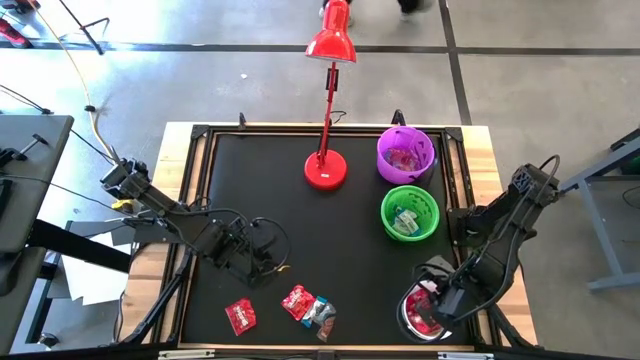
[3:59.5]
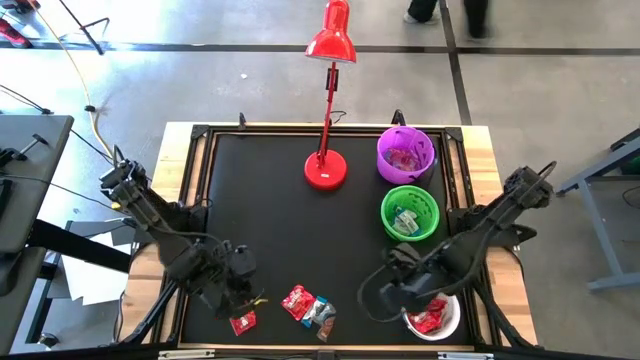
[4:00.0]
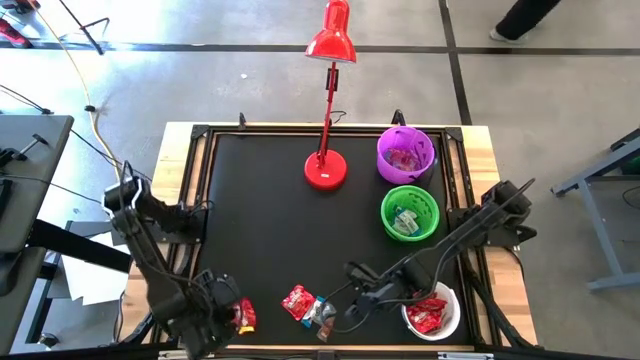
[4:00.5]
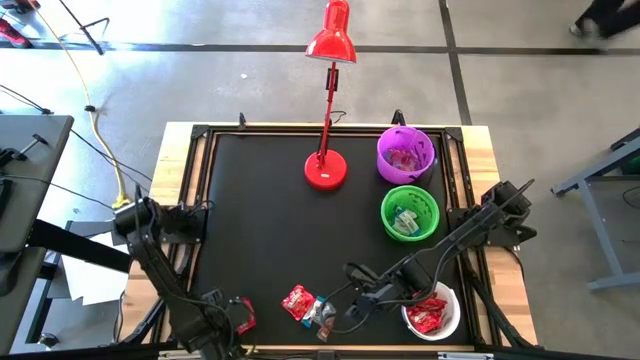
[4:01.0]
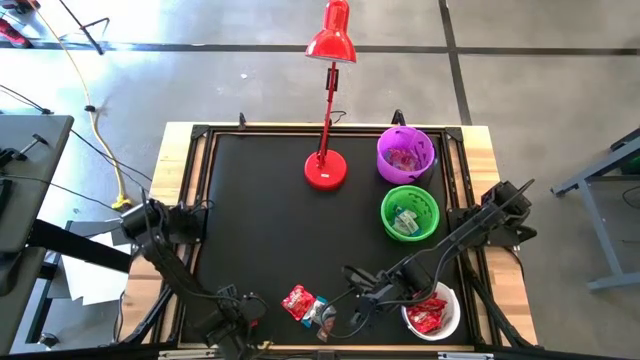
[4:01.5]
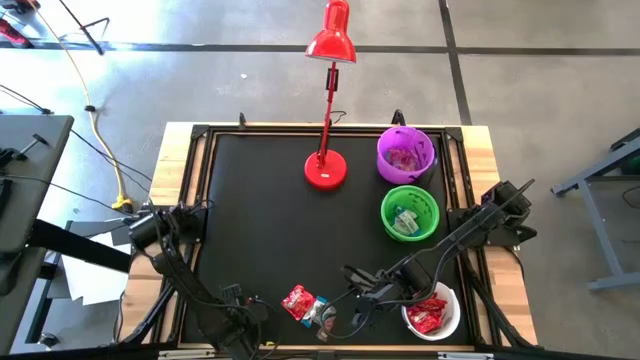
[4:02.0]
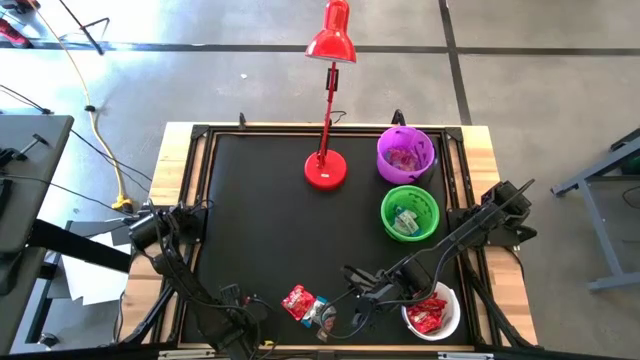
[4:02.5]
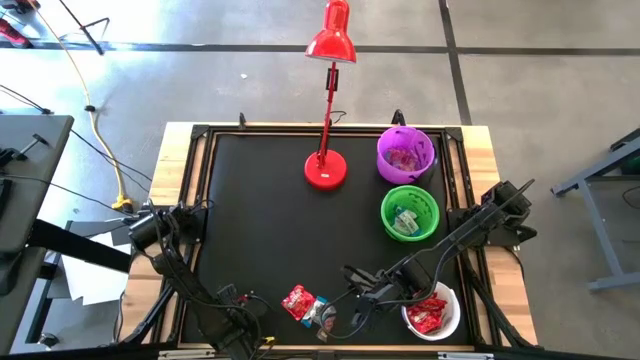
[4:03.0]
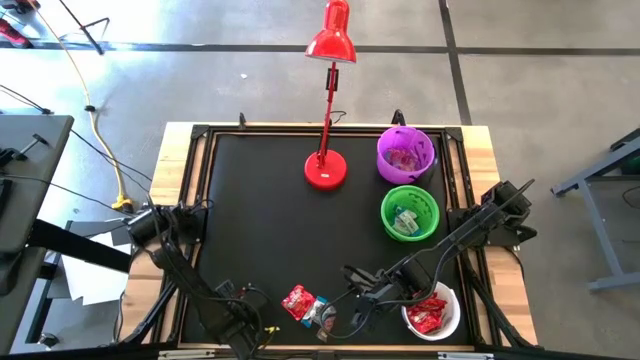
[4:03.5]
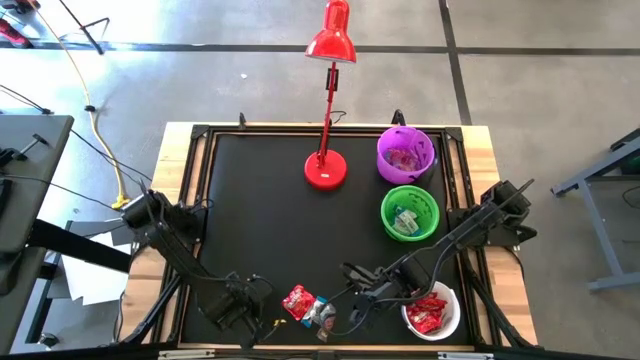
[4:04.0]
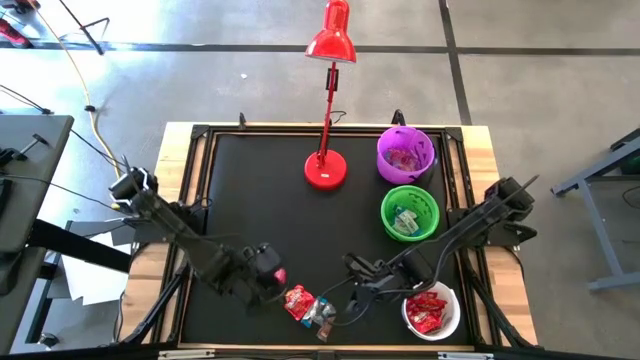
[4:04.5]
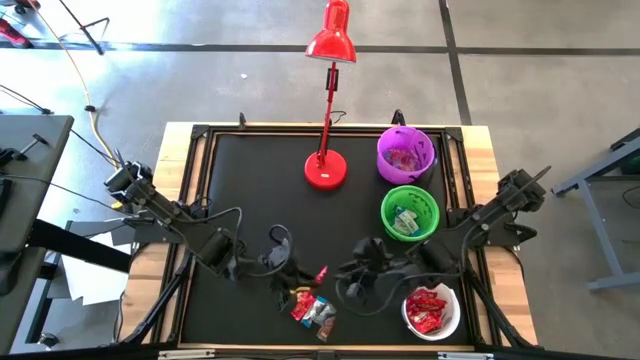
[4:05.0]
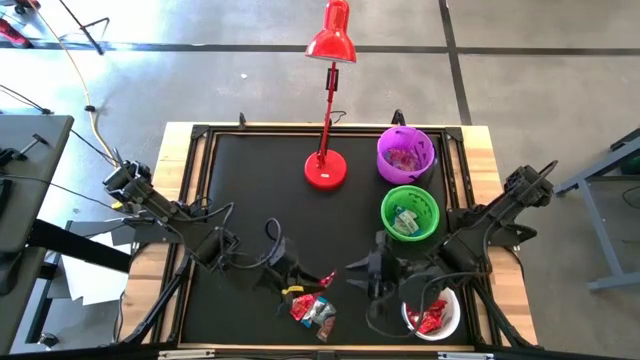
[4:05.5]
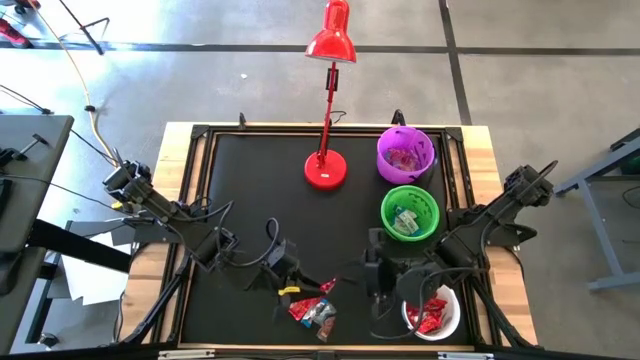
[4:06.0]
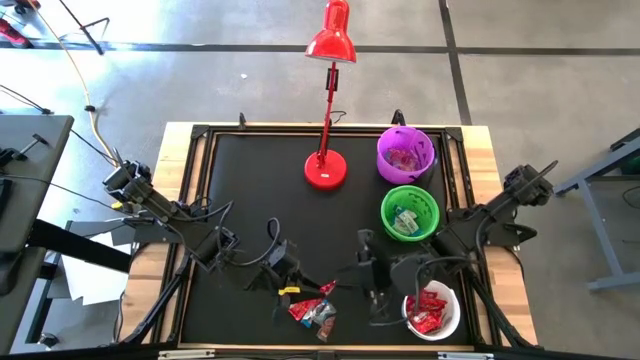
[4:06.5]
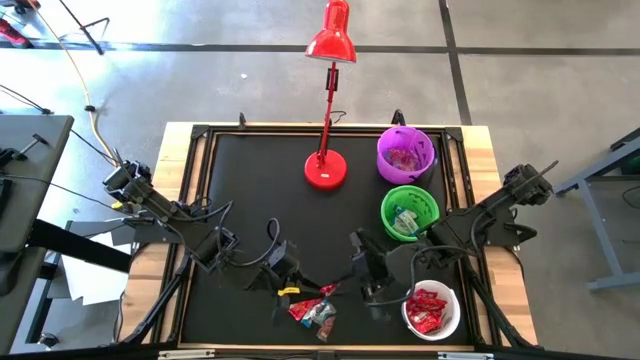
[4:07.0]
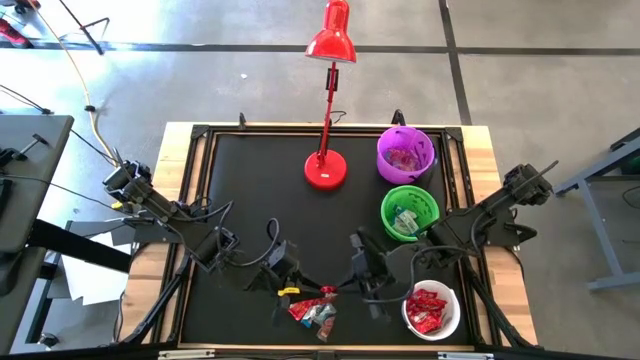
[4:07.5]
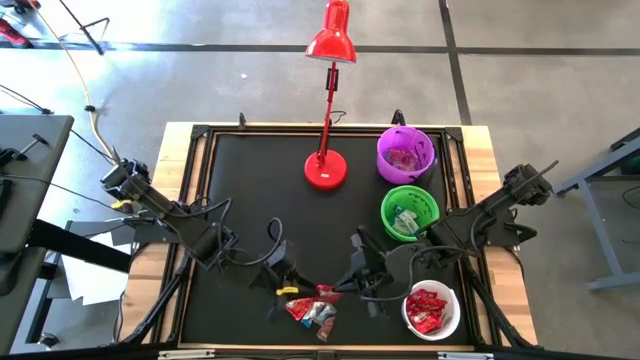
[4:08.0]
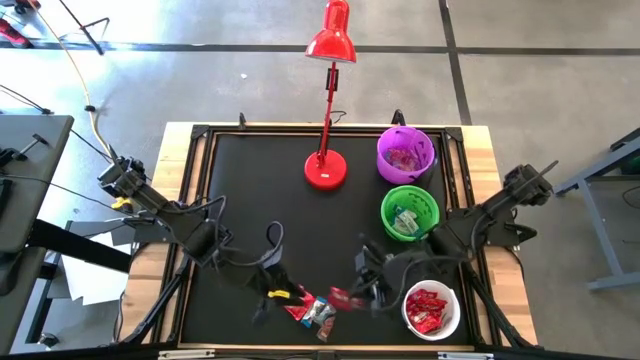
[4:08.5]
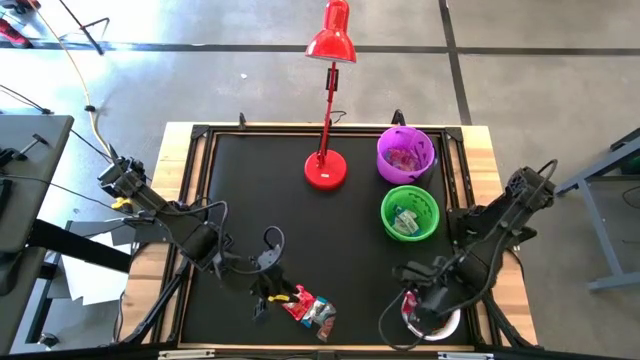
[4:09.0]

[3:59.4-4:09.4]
Task: Organize candy in baskets
Put the red candy into the white bucket

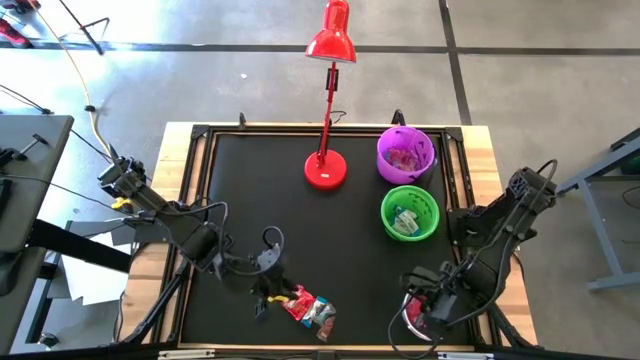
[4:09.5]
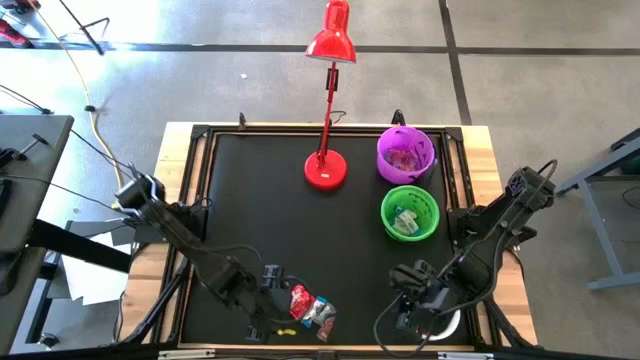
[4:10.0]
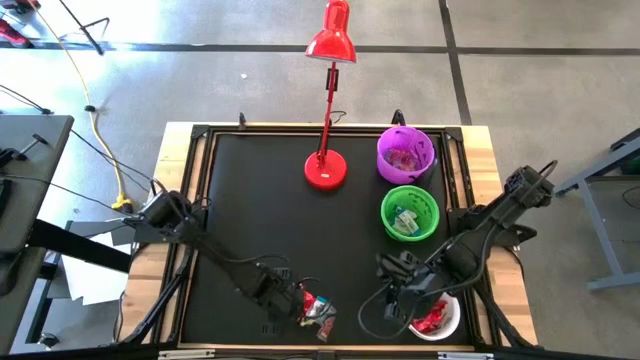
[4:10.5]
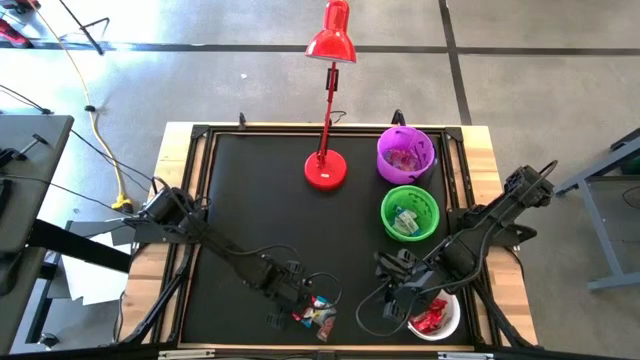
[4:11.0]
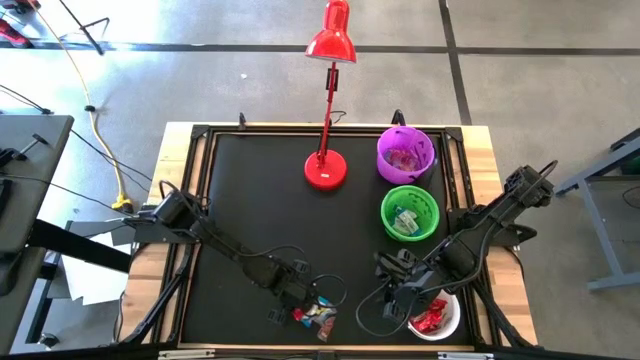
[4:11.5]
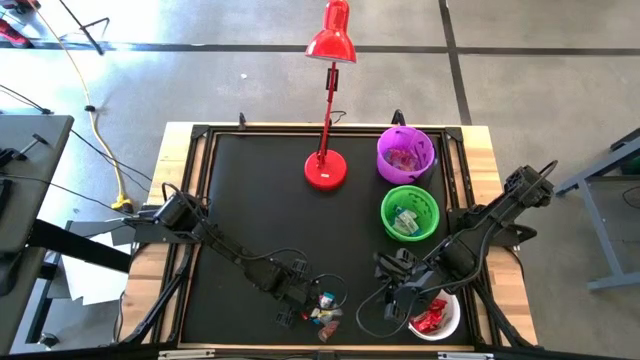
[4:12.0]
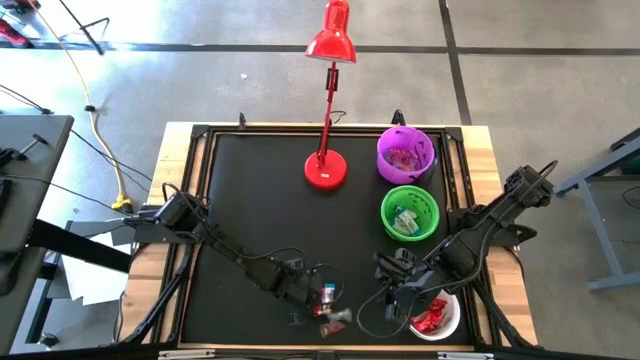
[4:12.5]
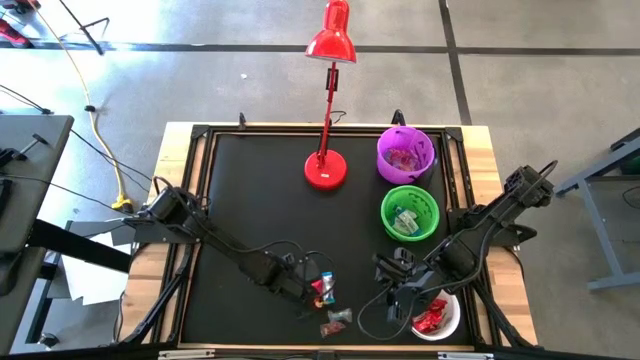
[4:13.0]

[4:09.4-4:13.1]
Put the red candy into the white bucket

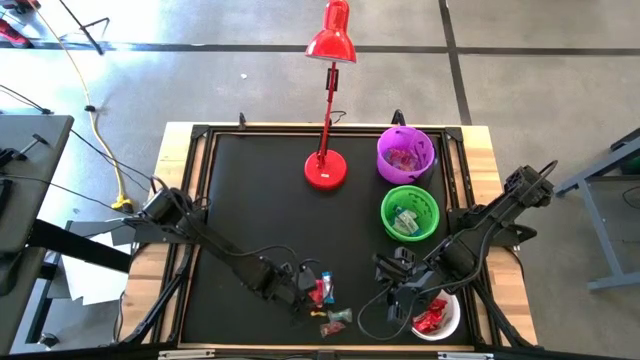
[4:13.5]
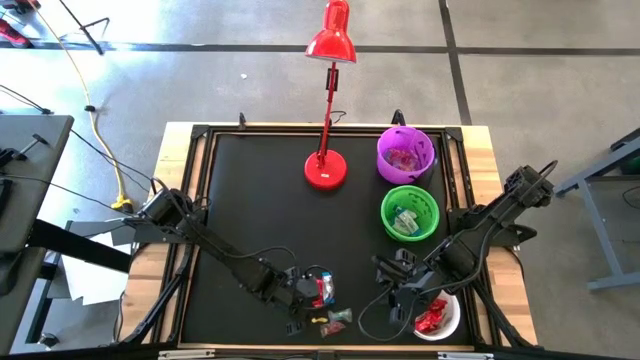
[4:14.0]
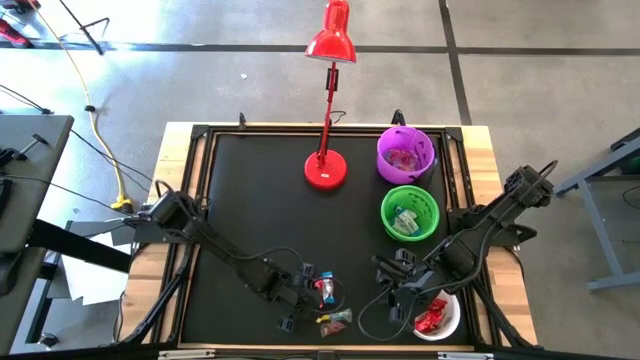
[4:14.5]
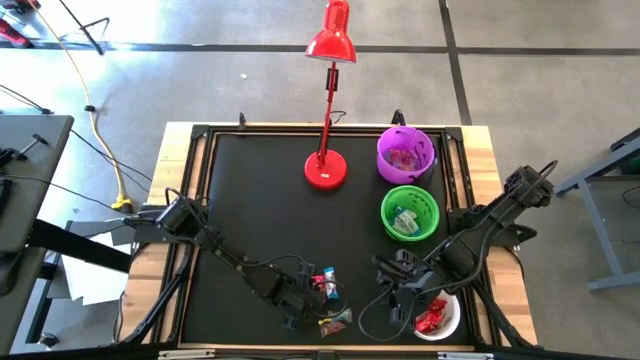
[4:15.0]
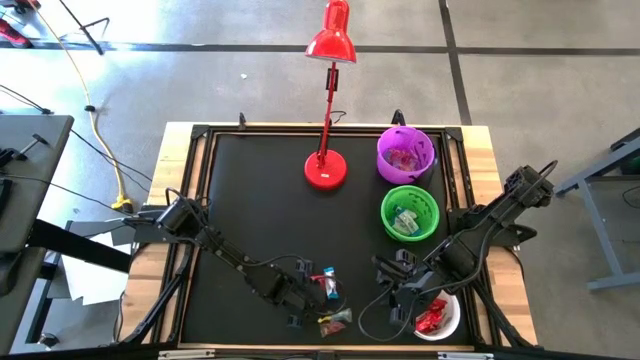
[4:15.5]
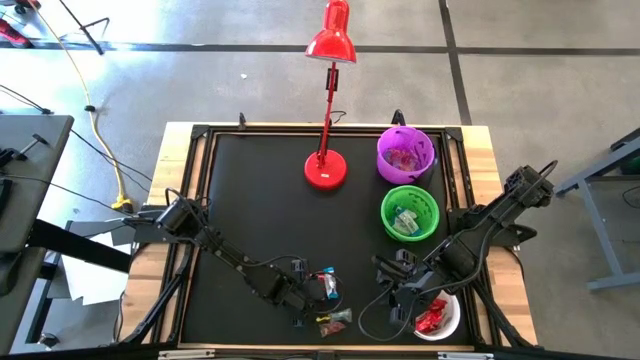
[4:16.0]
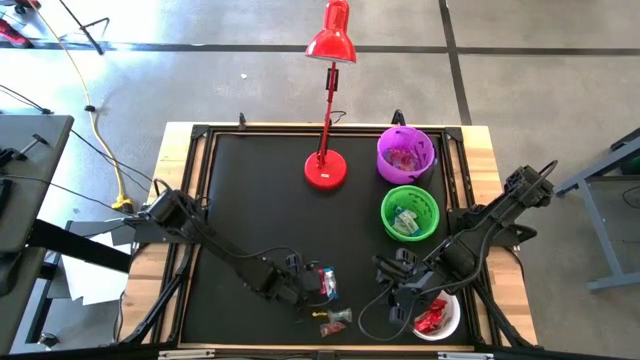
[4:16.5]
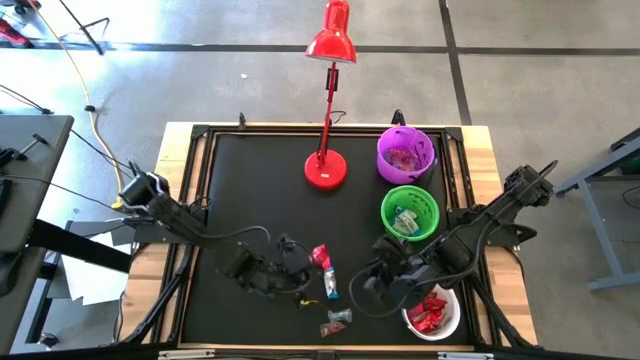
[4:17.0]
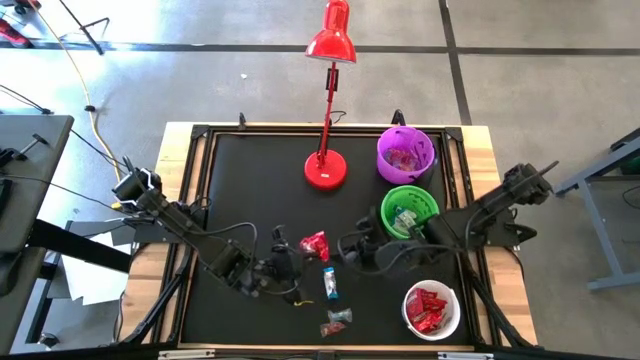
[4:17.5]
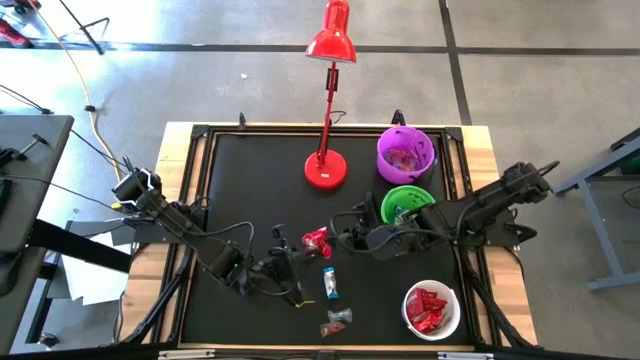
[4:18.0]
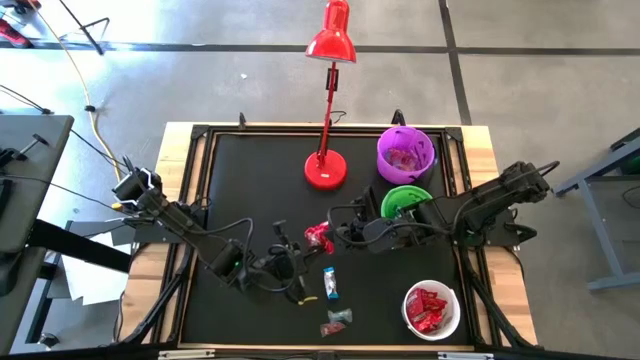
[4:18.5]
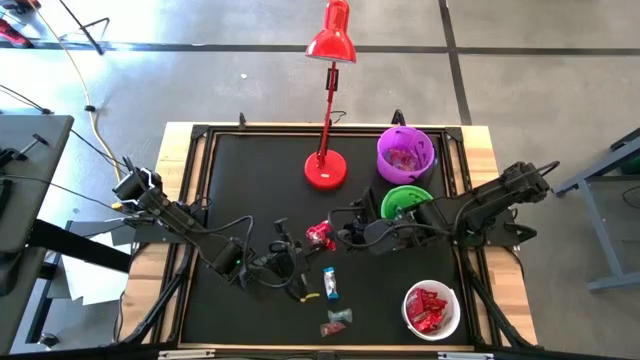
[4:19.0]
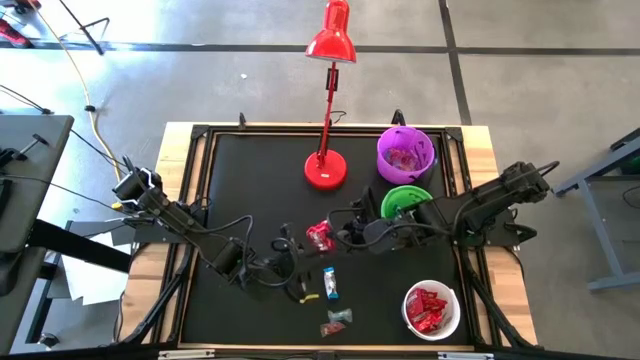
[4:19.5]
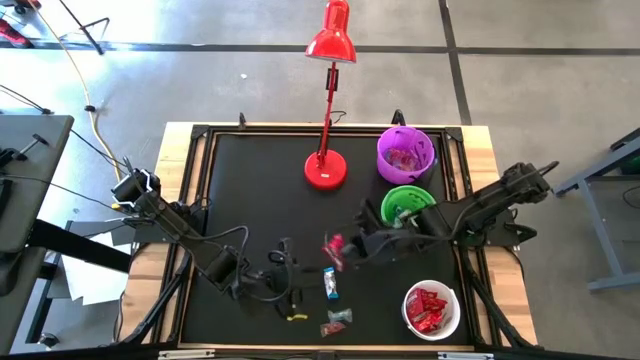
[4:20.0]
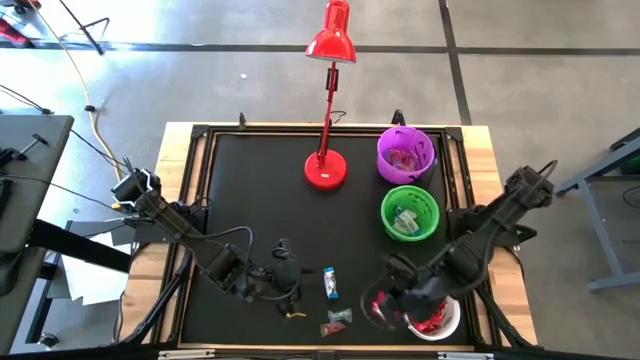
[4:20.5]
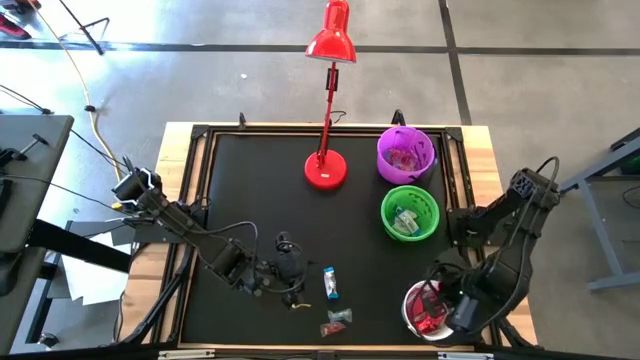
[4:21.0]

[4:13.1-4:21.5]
Put the red candy into the white bucket
